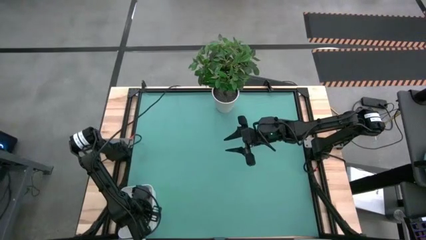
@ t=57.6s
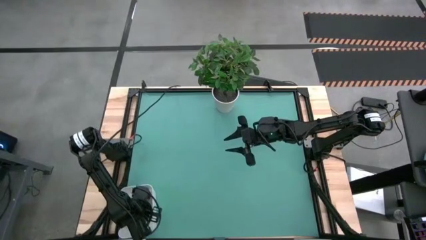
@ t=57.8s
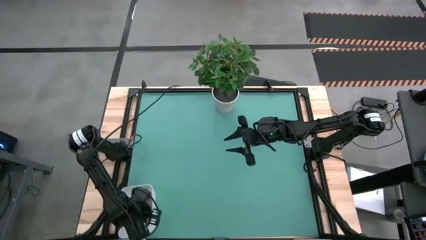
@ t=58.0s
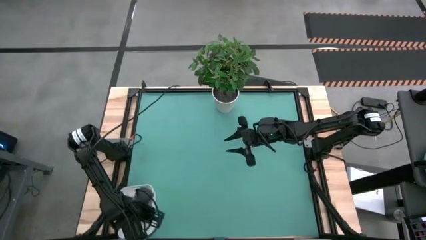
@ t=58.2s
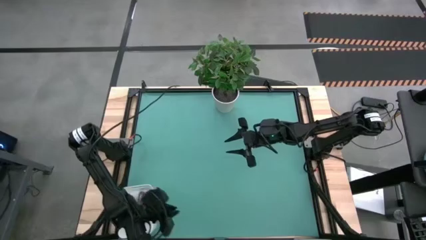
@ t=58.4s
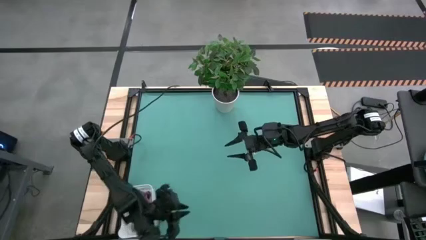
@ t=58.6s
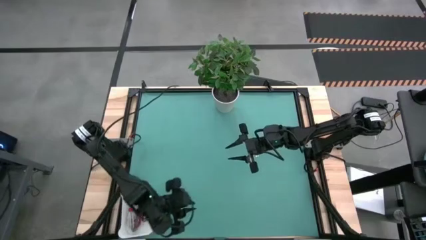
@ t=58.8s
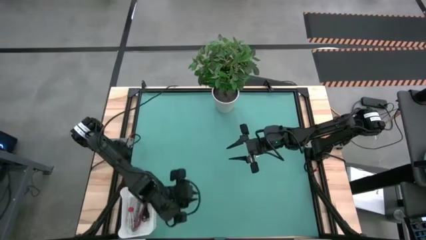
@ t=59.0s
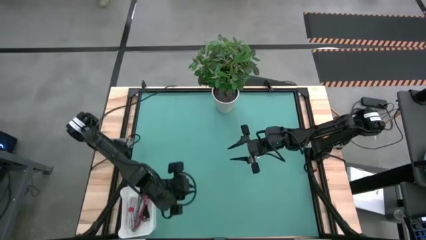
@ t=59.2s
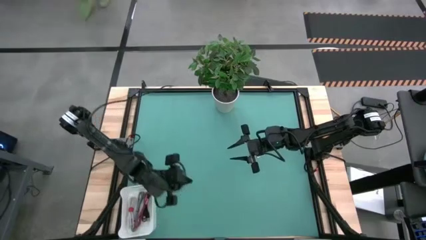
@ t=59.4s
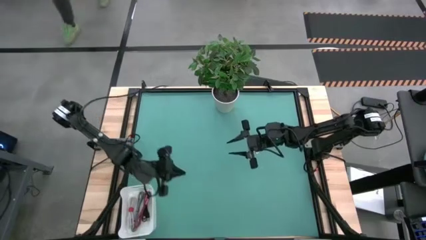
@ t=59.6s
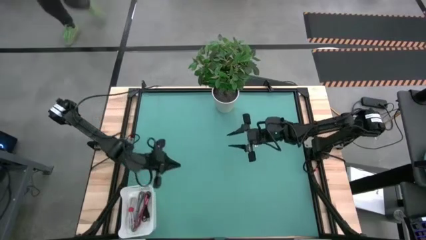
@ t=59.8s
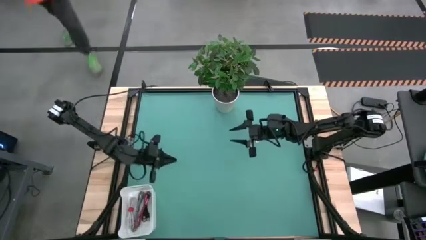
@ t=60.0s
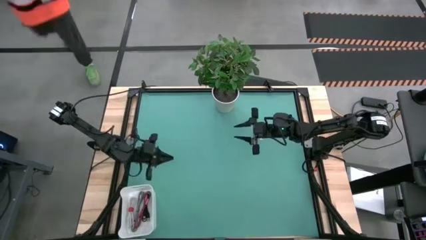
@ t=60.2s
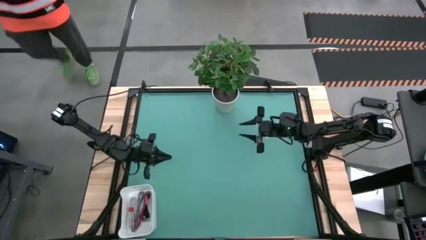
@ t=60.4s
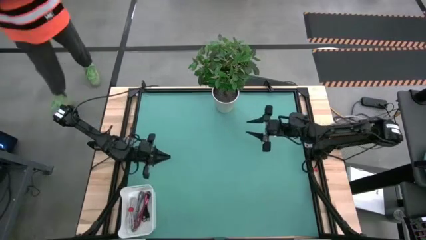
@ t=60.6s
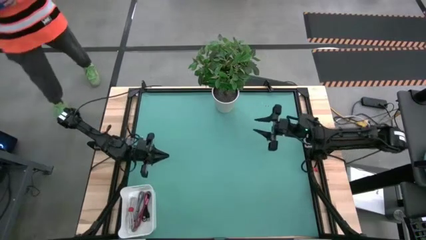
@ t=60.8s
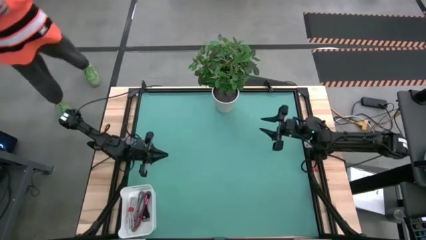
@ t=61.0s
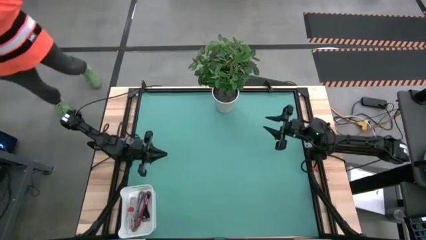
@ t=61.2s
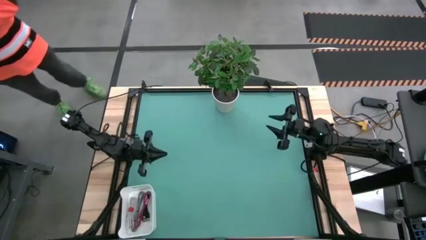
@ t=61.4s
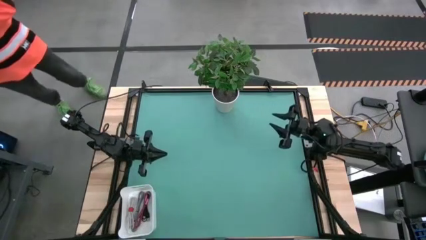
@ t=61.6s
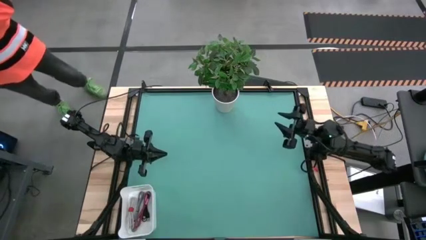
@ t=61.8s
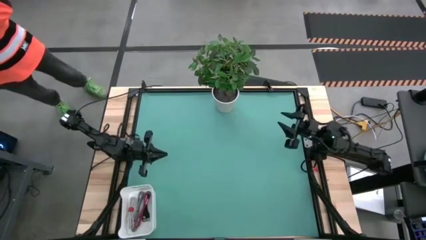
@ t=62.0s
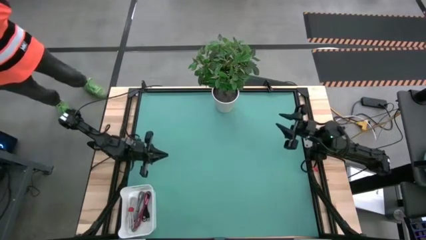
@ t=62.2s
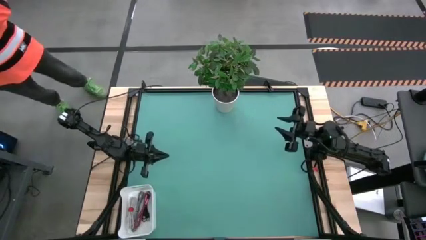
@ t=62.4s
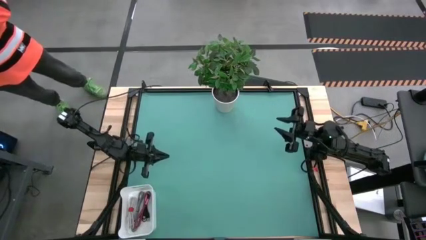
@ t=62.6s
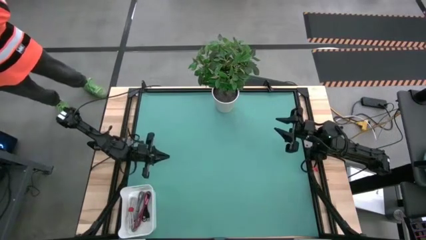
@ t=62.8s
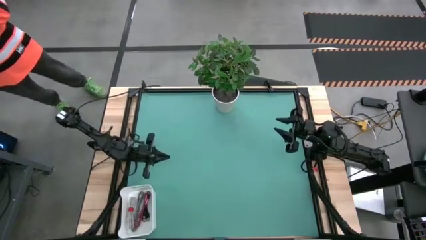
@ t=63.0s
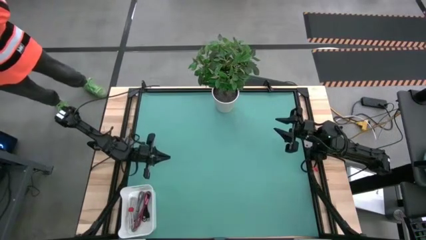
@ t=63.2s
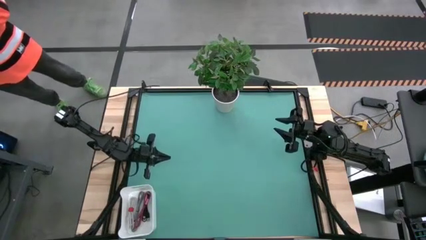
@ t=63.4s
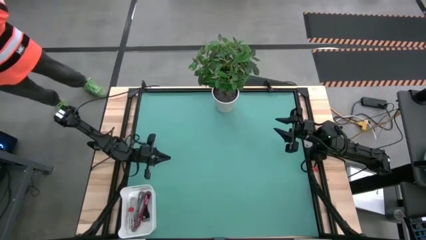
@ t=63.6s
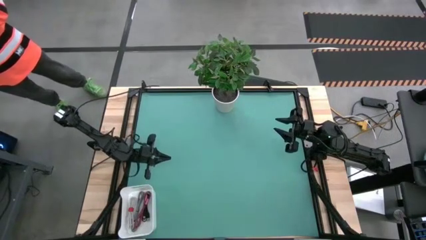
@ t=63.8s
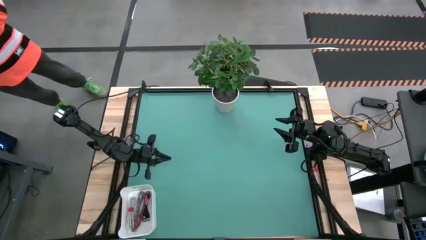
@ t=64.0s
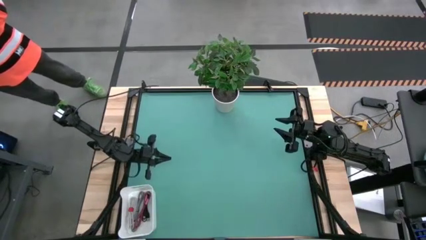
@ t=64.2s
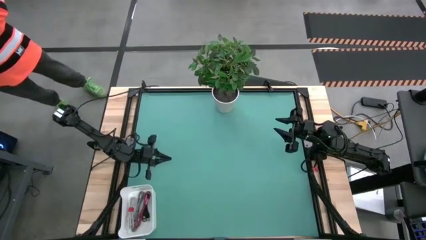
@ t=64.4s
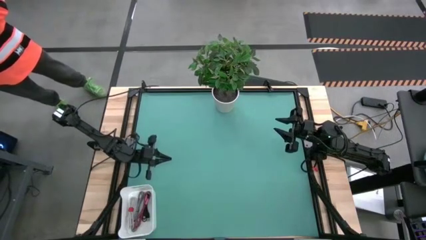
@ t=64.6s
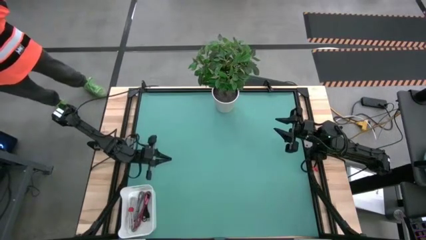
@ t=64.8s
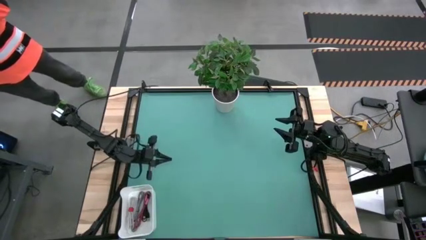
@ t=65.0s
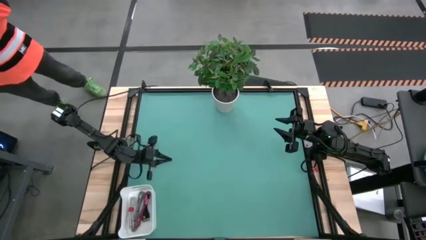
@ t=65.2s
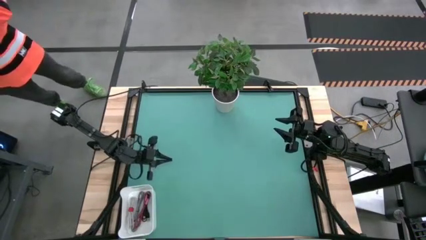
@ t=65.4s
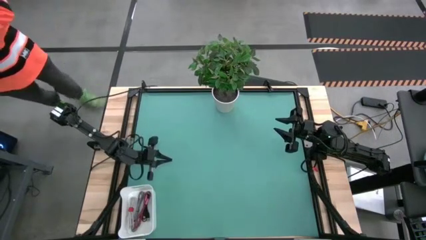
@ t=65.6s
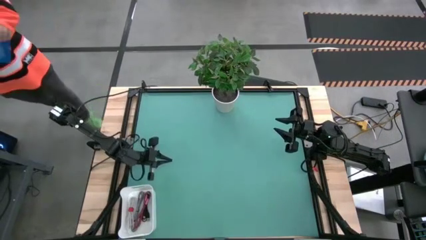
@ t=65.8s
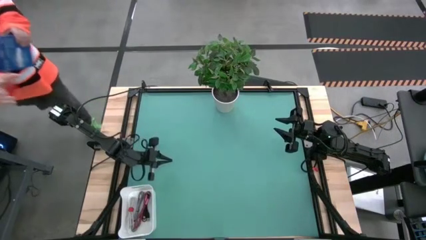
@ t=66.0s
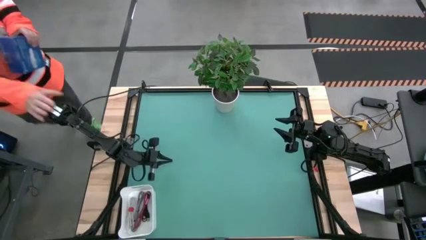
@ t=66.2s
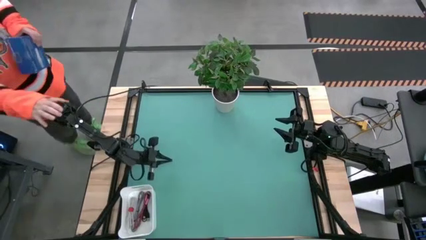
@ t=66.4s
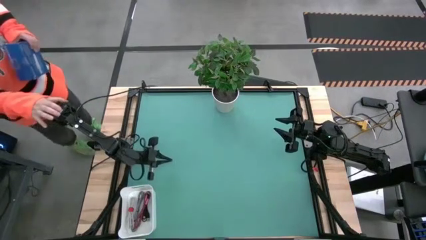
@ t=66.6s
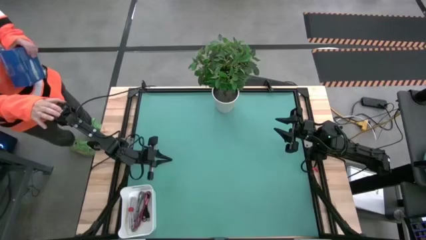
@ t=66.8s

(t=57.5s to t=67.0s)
Task: Pick and place USB-C Cables
Return to Home Position
